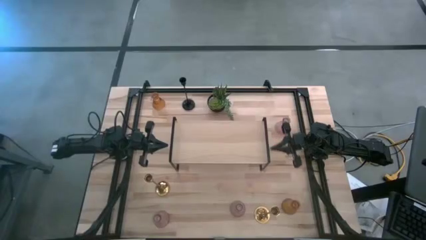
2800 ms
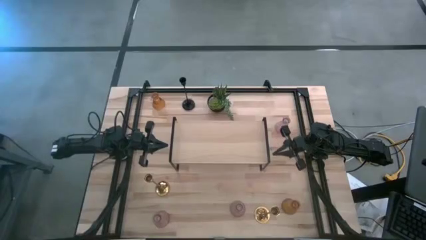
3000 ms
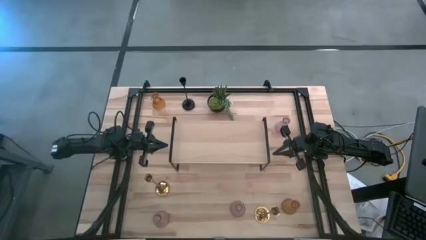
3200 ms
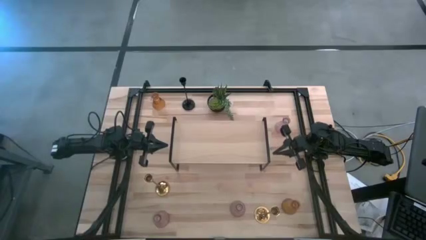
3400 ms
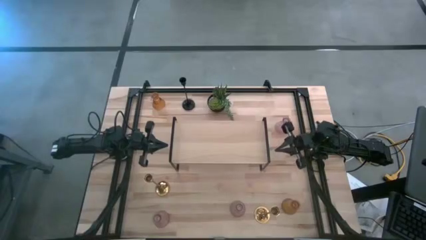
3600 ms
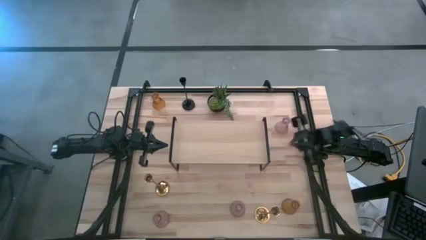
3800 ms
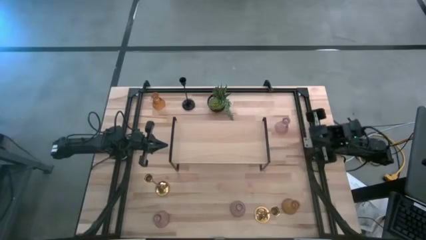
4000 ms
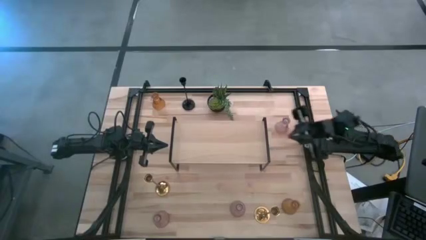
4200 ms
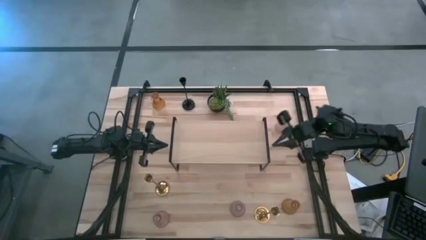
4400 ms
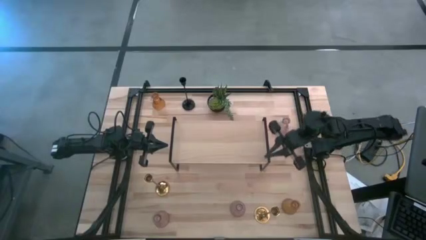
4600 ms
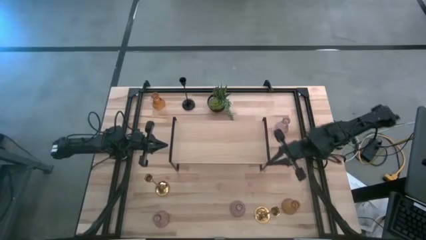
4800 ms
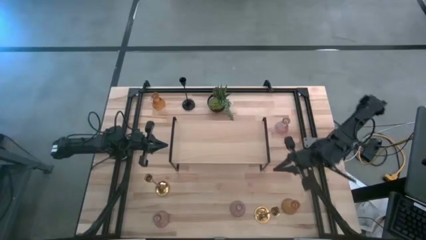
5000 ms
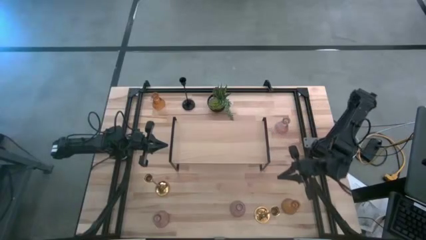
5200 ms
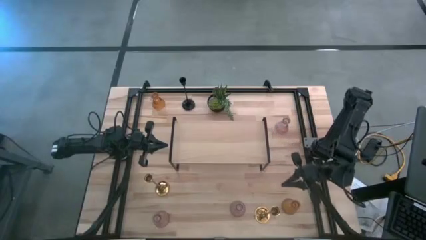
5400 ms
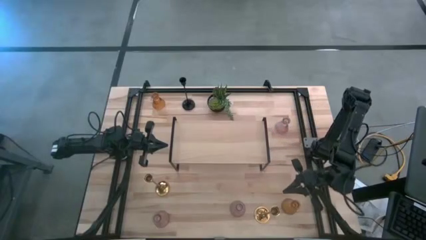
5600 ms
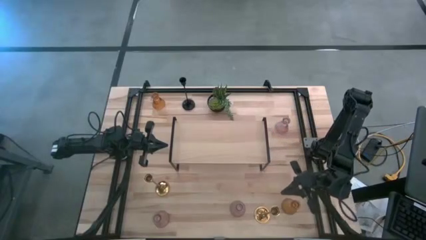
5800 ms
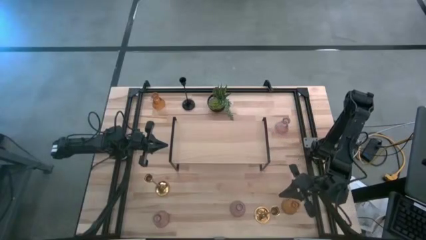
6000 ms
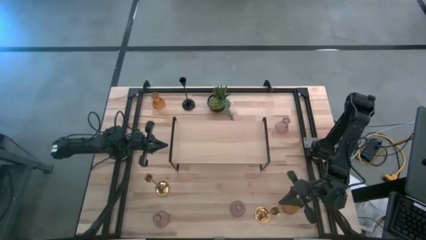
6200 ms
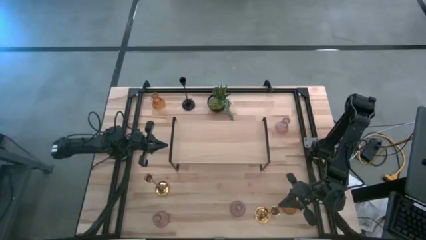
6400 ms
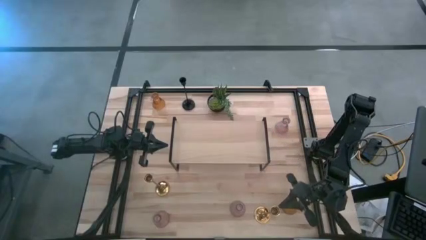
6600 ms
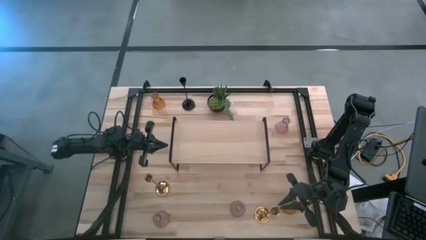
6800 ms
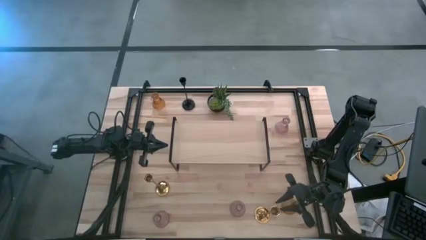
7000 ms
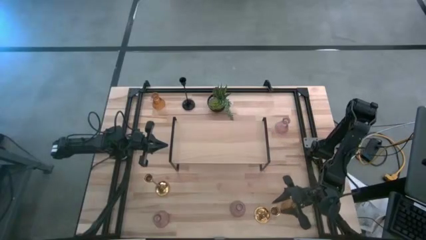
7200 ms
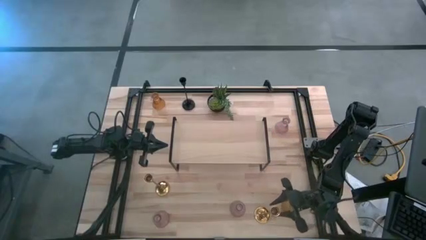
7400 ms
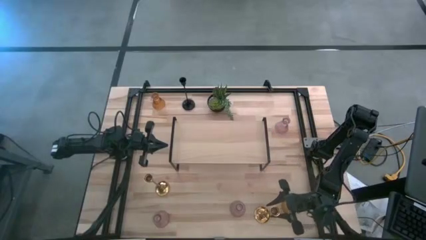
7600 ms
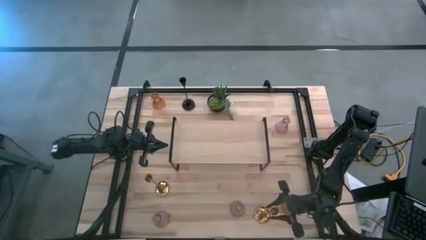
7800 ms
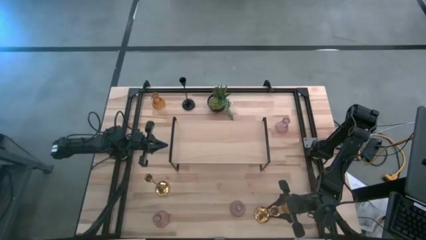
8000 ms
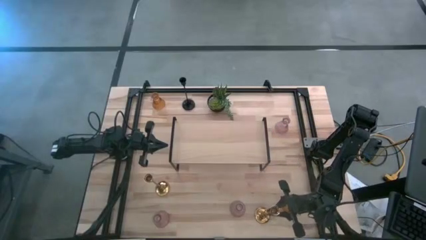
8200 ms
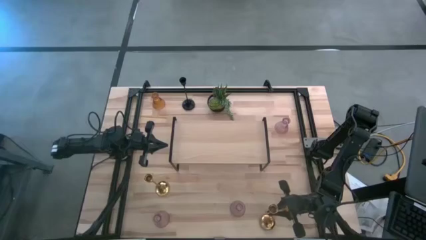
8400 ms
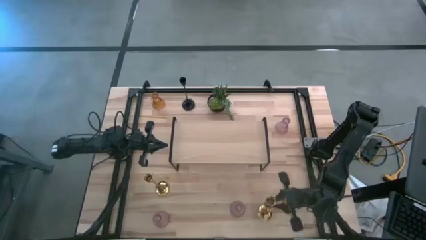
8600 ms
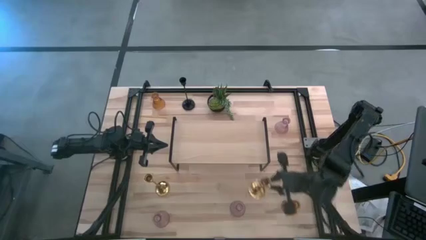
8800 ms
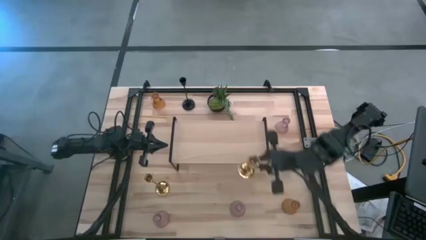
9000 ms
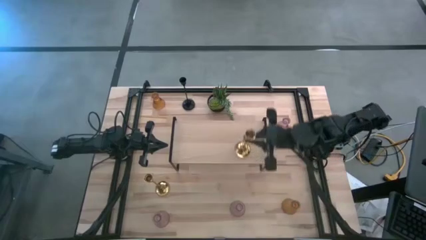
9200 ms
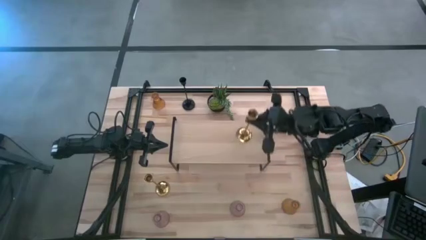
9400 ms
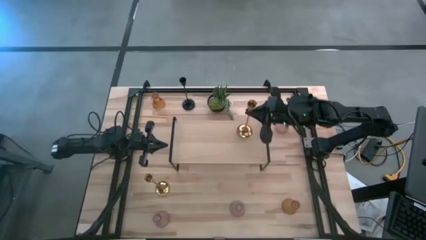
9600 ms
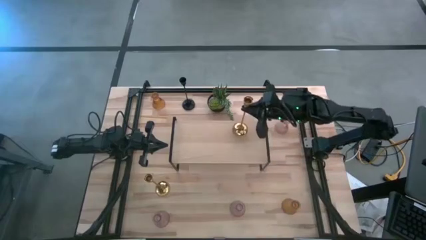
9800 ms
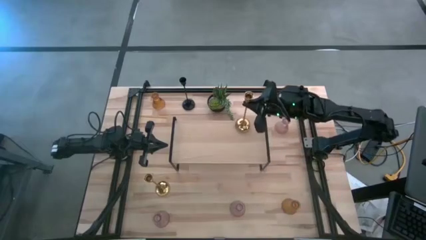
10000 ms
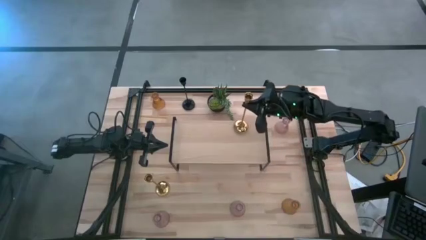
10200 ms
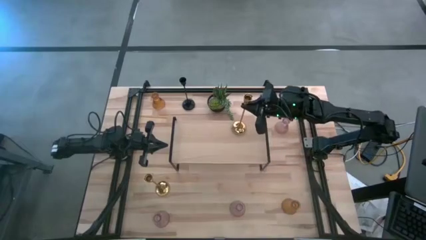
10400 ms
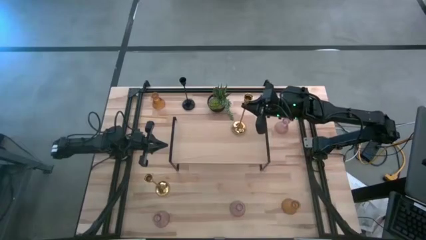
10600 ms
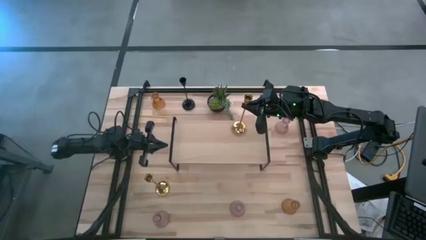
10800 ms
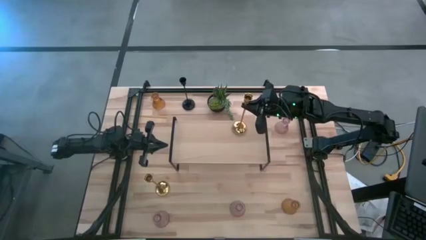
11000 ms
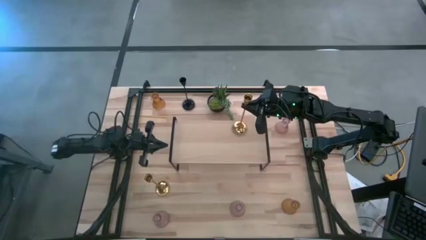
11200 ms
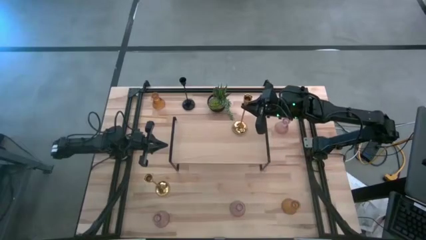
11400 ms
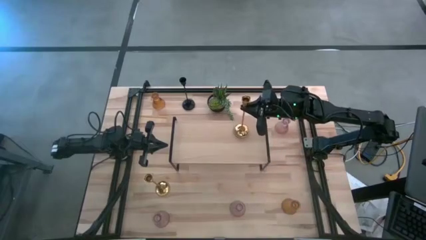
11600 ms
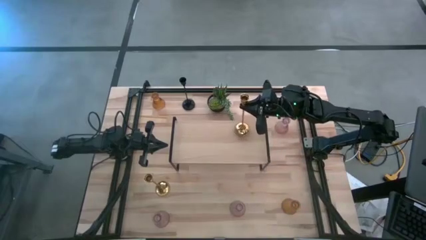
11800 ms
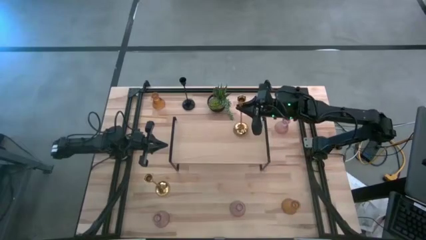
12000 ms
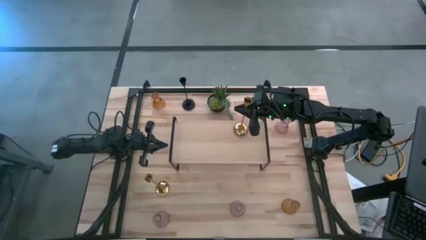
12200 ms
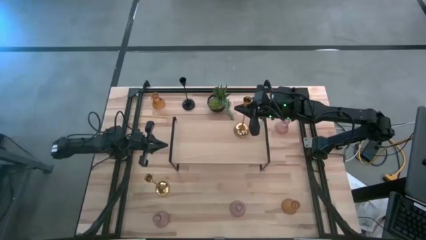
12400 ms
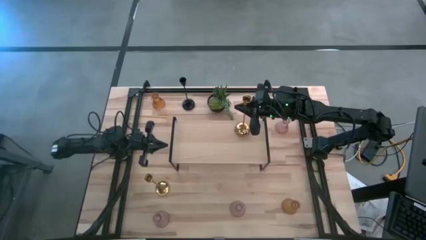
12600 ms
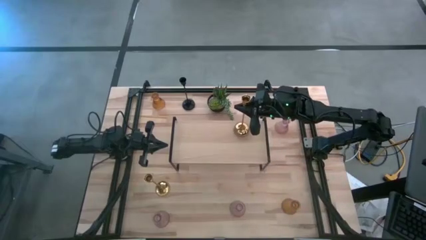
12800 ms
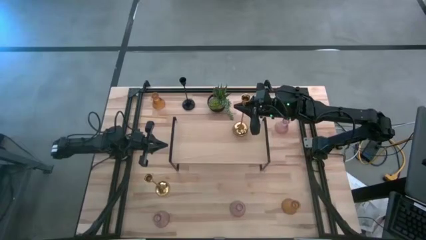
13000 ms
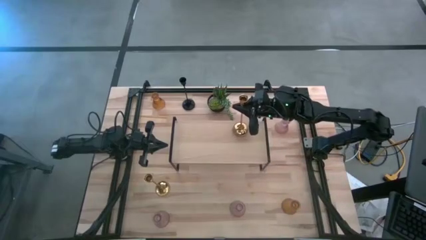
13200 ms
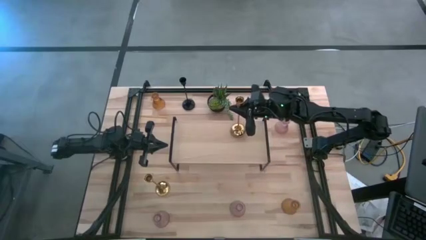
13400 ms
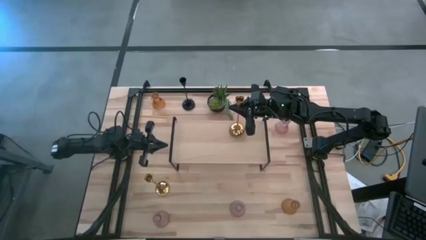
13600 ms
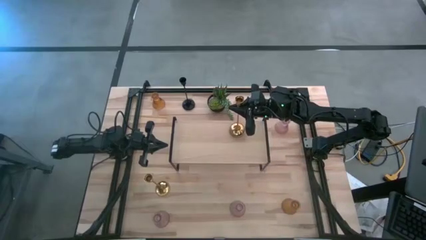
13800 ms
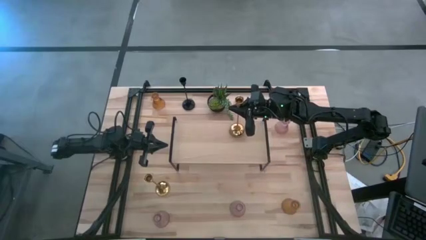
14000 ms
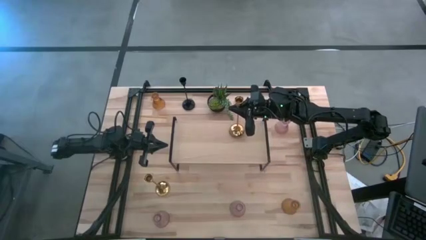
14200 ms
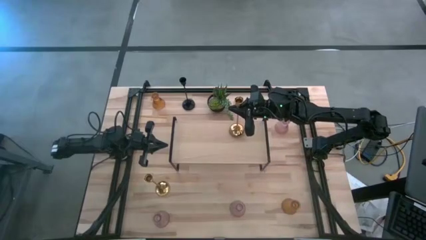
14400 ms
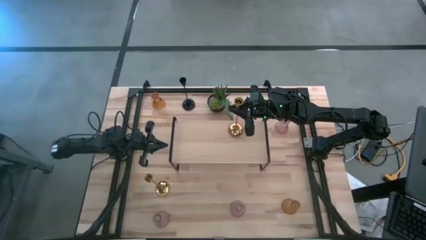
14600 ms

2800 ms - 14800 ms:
Task: Pick & Place candle stick holders
Put the right gold candle holder on the shelf

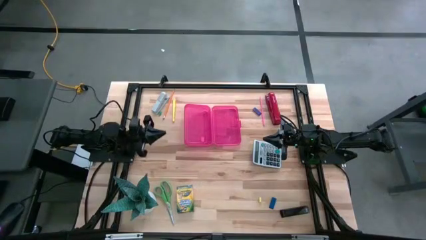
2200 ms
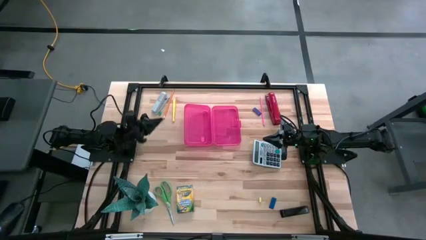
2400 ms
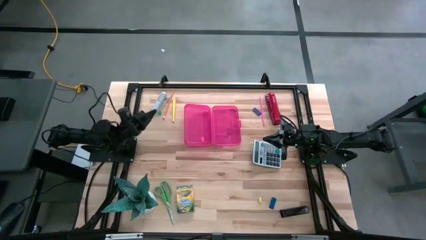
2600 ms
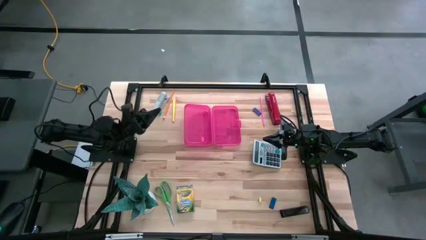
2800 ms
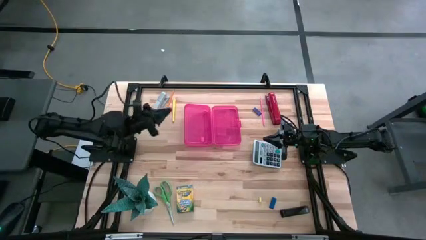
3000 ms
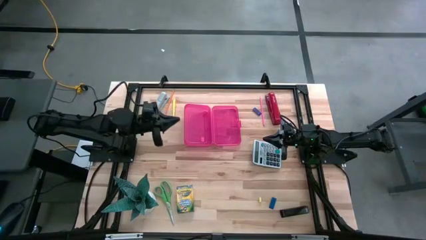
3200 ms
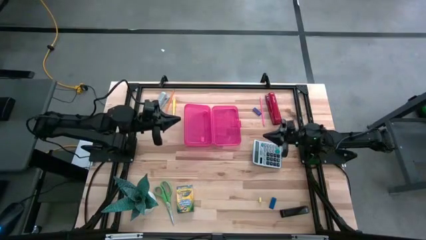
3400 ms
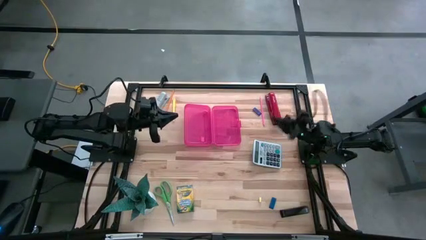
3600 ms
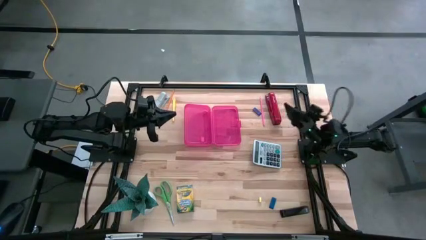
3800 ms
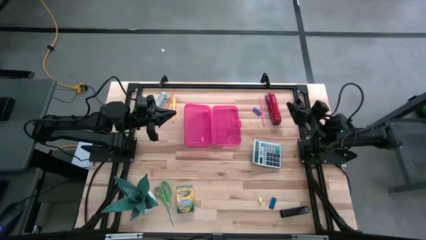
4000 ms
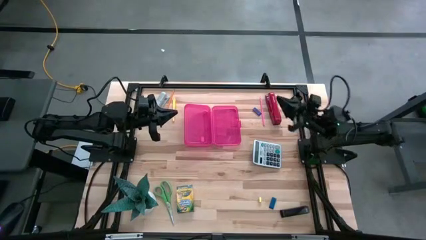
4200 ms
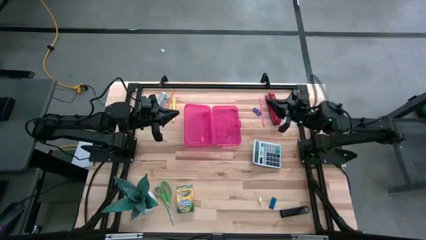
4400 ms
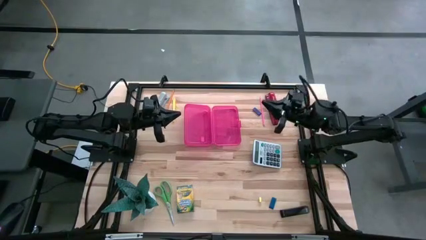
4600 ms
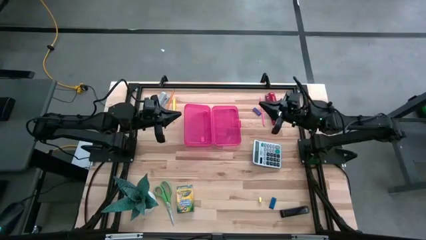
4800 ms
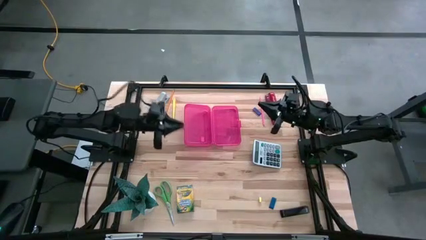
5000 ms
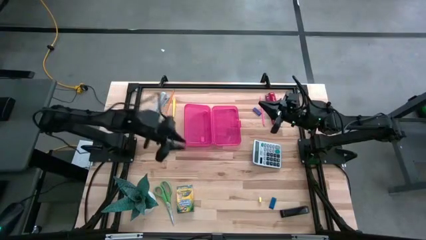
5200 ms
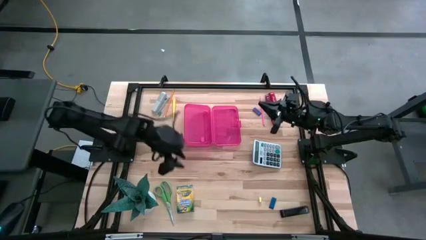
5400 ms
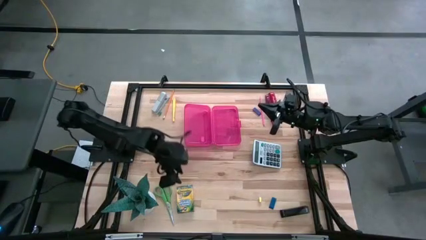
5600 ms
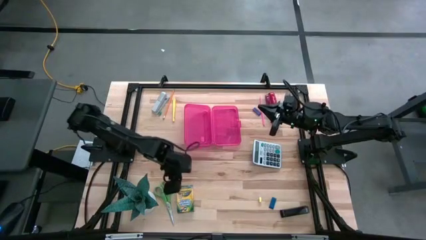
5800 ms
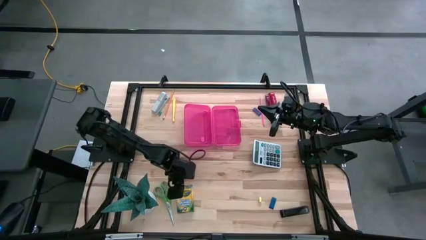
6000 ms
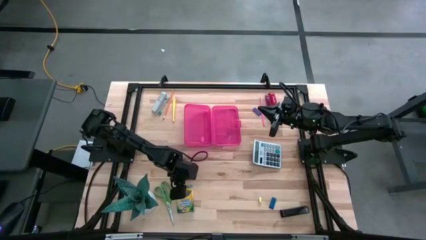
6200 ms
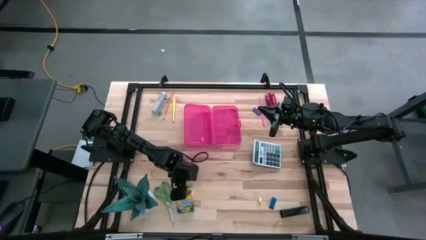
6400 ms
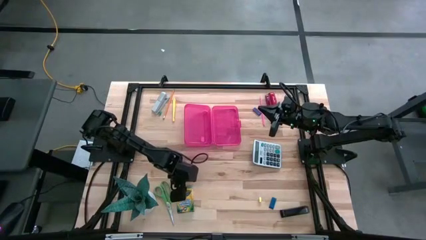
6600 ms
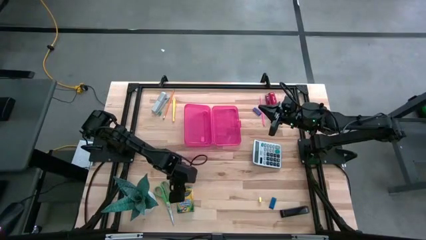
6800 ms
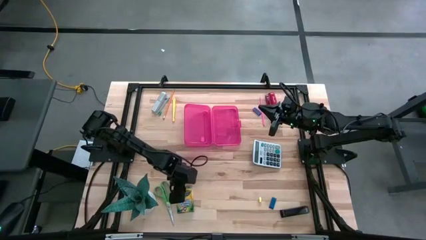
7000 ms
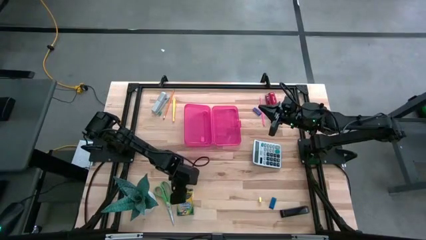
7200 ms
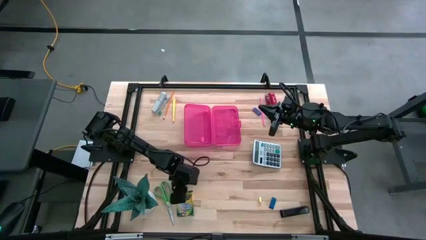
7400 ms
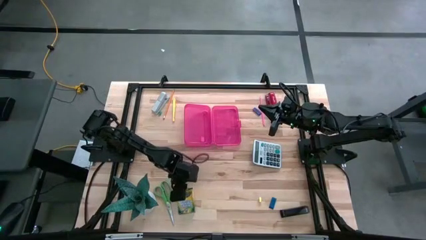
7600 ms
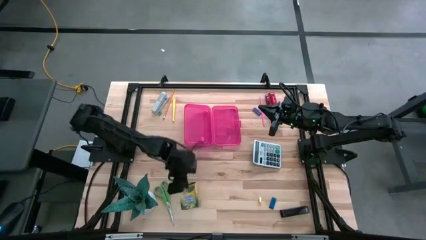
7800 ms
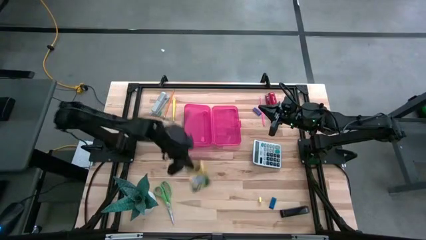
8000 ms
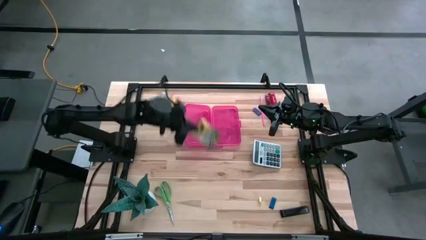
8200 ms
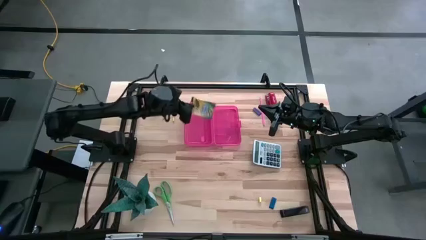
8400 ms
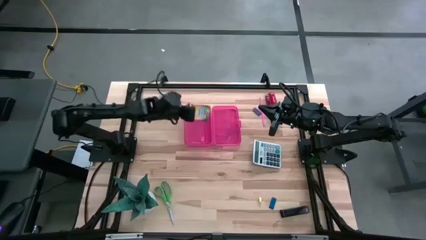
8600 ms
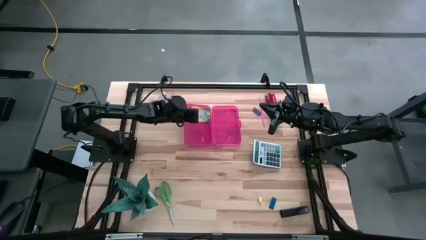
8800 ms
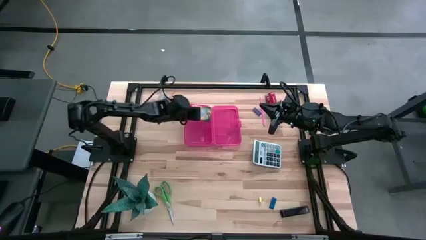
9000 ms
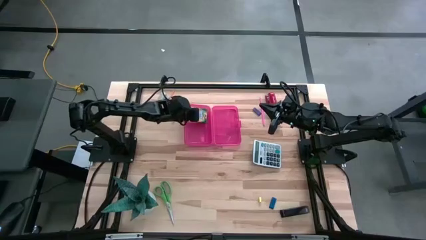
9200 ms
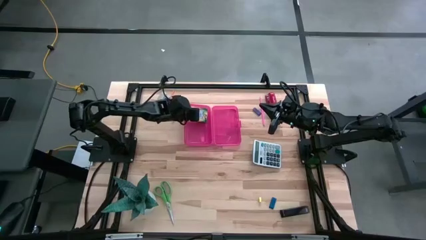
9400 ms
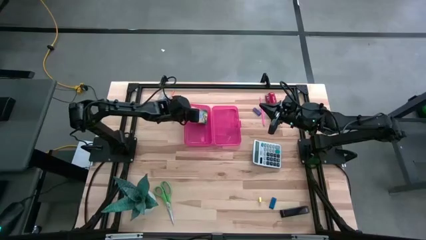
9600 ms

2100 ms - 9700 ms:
Task: Pack school essentials
Put the crayon box into the pink pencil box
